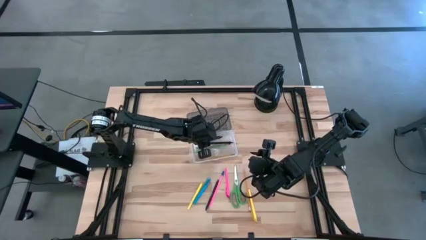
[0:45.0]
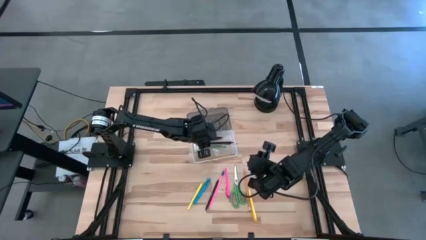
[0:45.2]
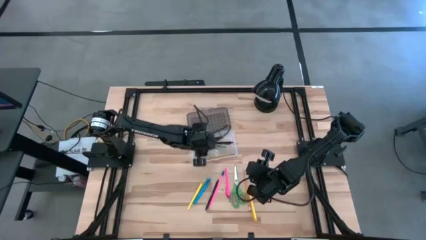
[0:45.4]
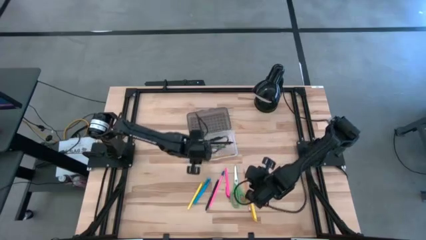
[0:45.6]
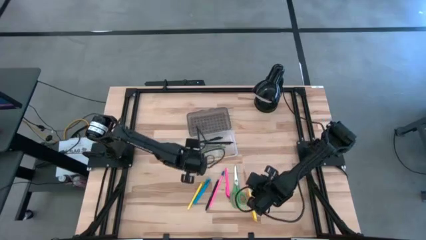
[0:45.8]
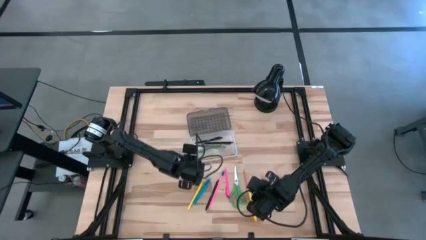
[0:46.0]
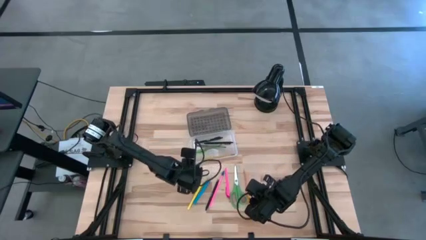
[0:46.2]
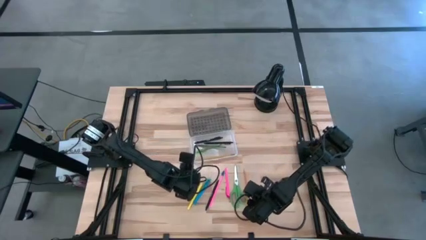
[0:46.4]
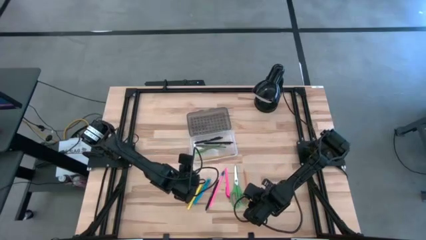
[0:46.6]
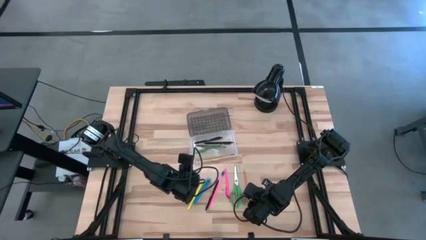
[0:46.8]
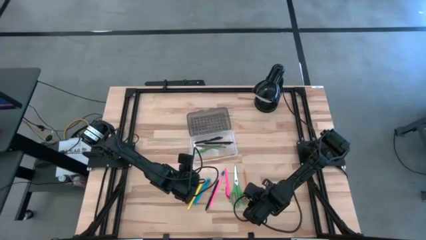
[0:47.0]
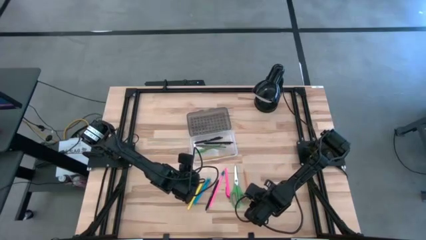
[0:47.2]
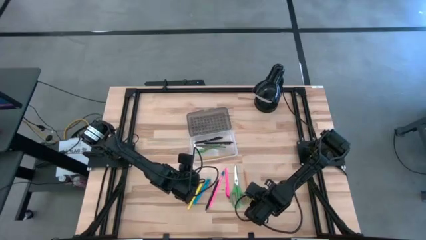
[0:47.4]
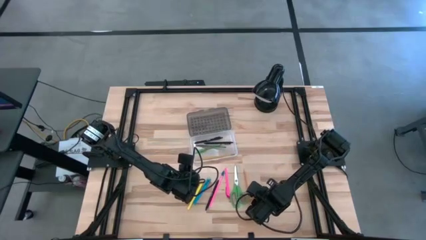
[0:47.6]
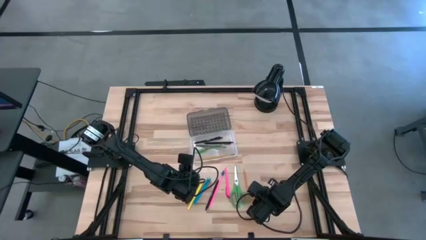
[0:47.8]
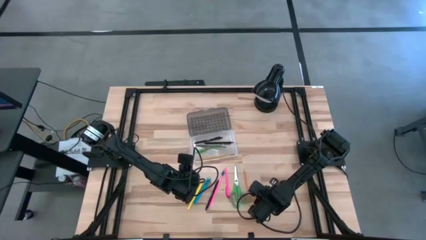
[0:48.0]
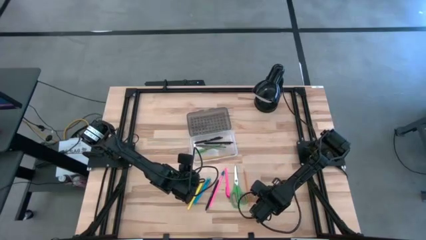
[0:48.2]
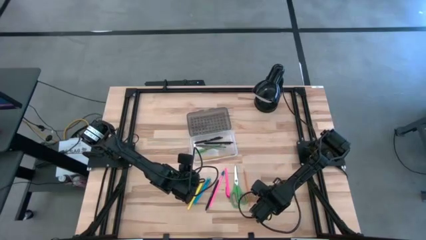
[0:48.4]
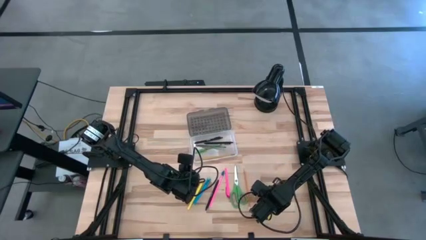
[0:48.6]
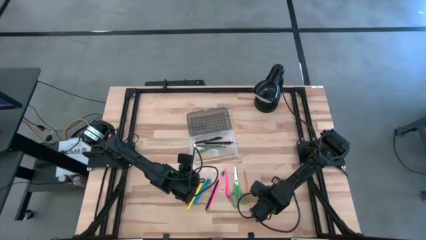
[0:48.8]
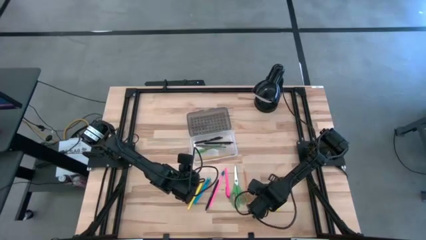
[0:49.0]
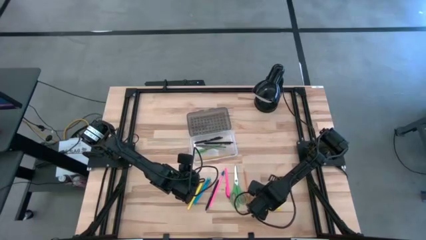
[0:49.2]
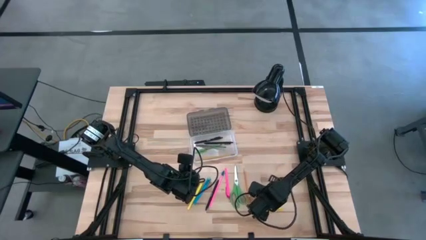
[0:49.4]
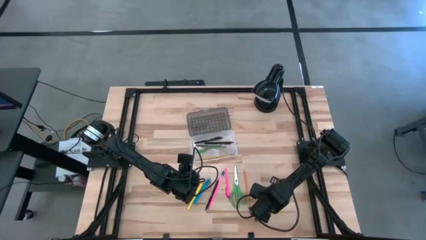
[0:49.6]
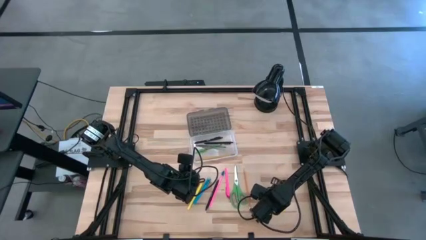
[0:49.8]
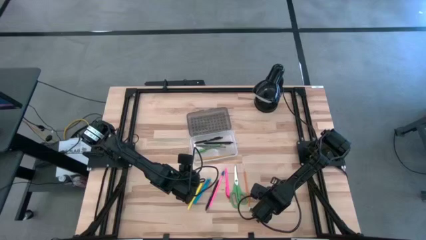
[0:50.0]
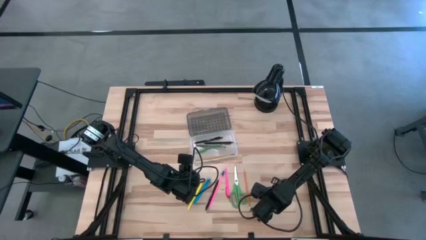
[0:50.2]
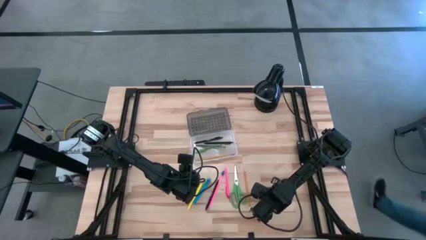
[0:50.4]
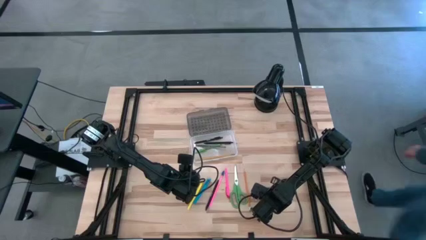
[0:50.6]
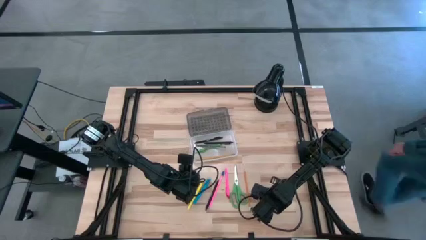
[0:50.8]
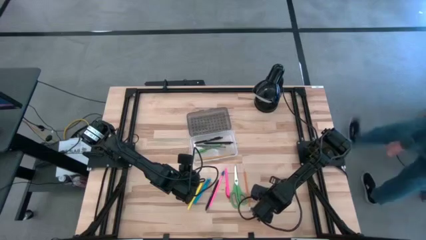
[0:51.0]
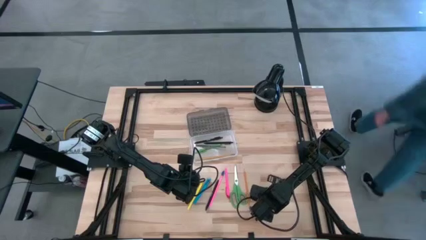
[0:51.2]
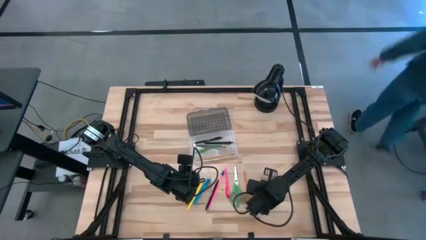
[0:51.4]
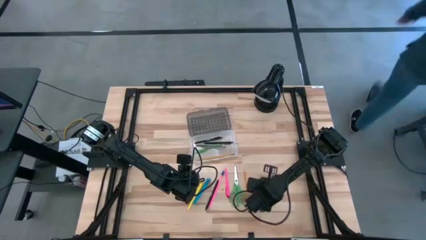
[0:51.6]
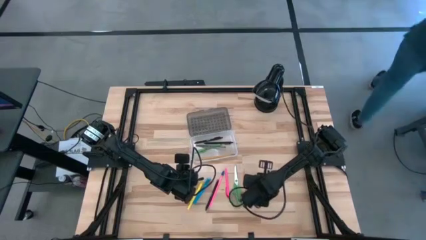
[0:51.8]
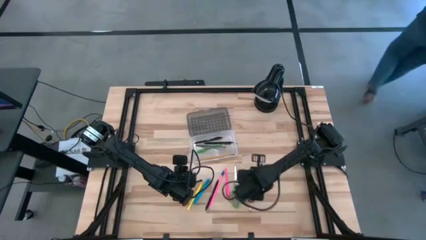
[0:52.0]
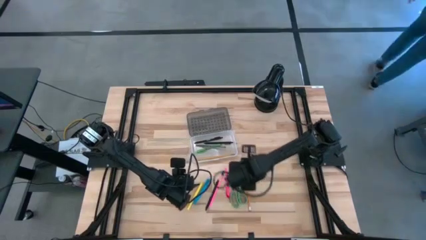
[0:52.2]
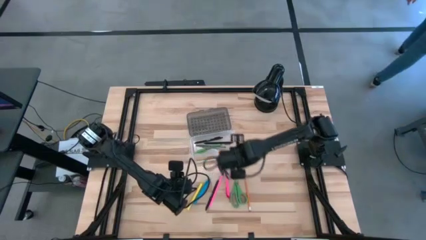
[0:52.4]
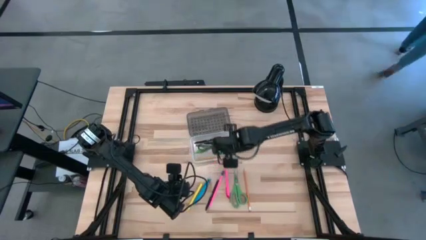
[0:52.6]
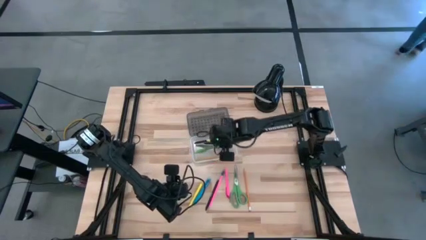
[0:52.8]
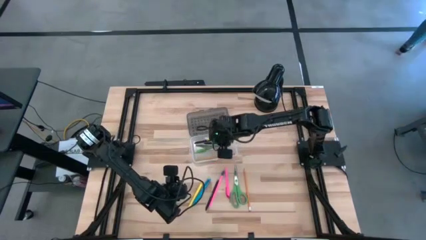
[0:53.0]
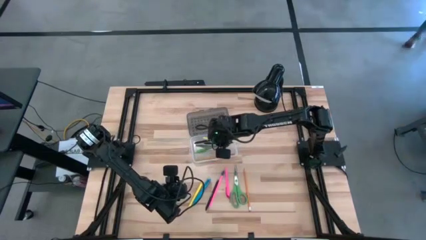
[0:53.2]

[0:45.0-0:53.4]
Task: Pick & place school supplies into a supply box
Put the right yellow pen into the transparent supply box

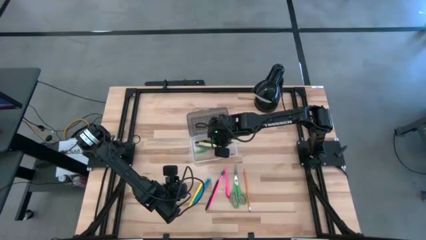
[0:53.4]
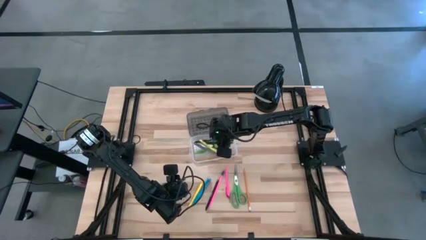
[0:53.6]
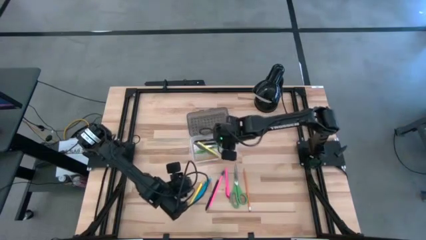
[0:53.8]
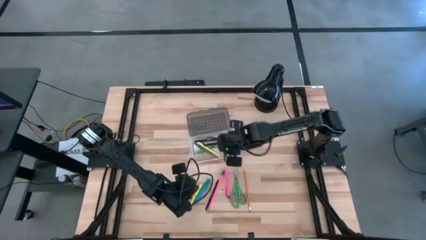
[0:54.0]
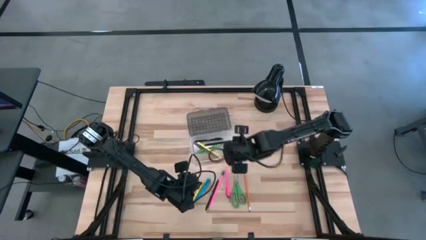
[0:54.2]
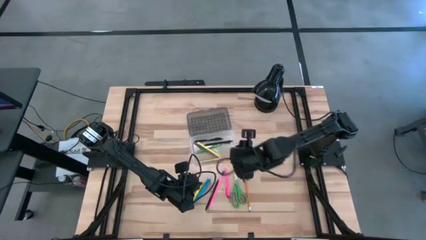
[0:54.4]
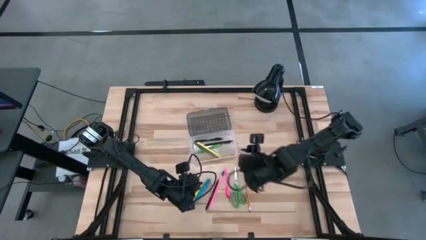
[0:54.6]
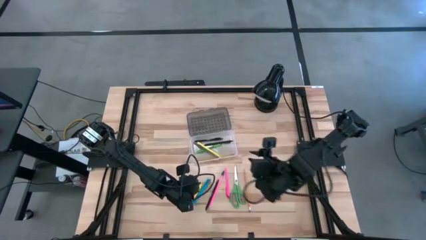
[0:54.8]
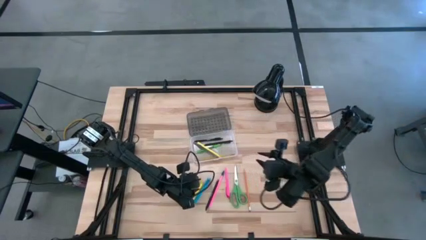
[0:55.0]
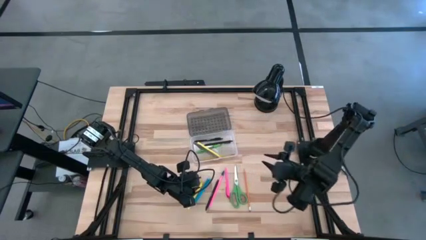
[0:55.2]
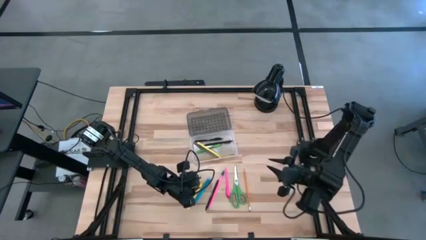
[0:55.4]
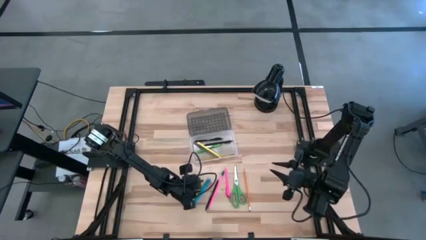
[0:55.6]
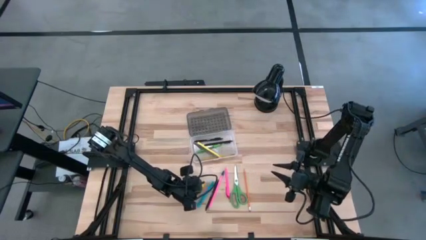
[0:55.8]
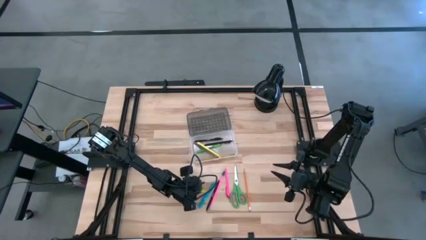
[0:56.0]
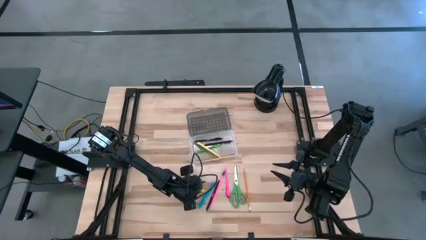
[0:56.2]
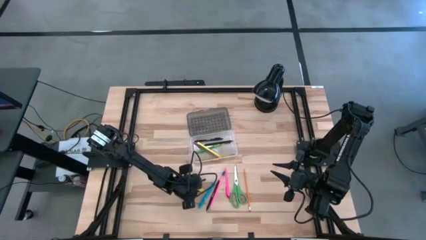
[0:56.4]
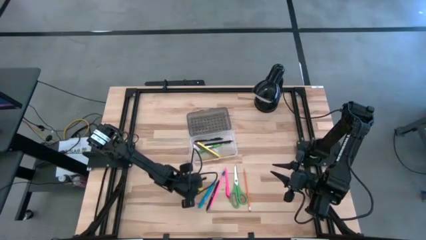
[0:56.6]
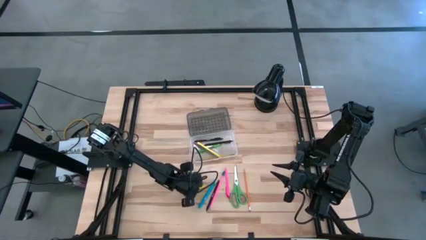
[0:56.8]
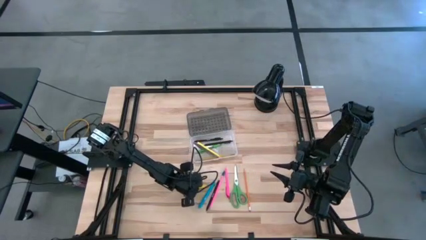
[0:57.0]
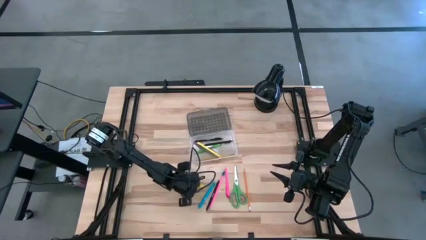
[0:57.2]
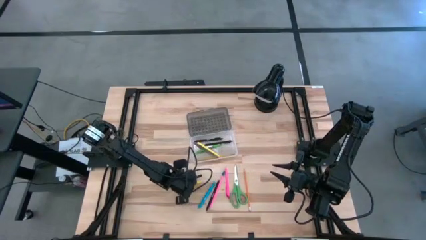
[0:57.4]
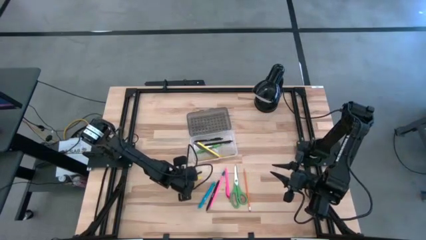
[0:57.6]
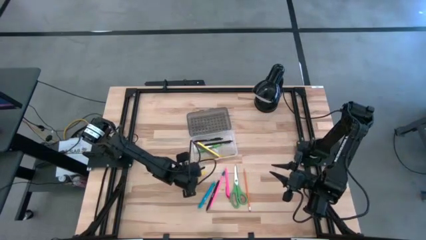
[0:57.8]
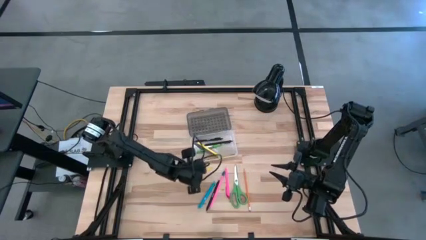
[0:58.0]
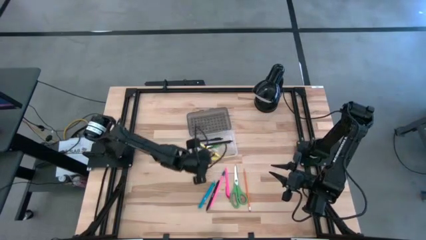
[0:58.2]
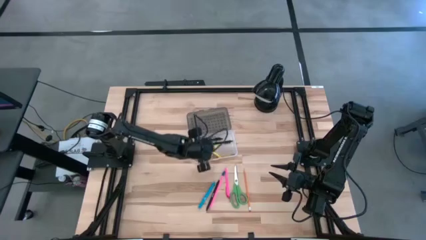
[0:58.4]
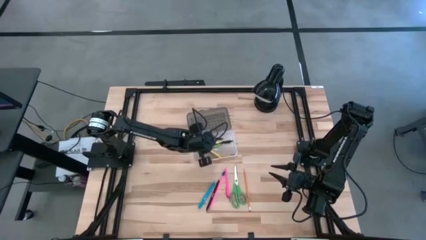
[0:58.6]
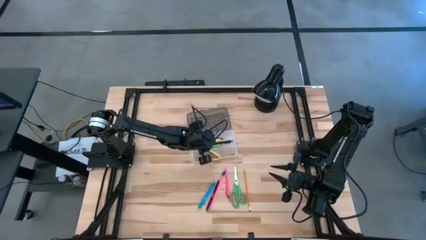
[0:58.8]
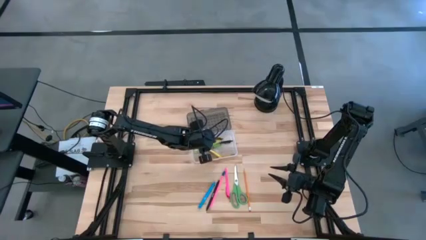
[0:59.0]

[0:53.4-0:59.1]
Put the yellow pen into the transparent supply box

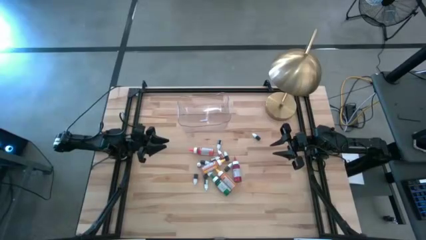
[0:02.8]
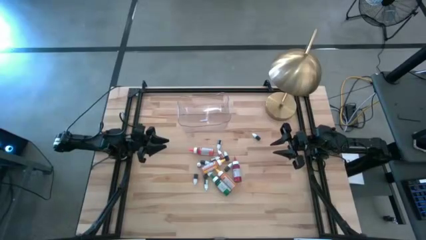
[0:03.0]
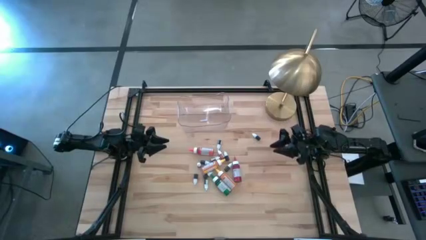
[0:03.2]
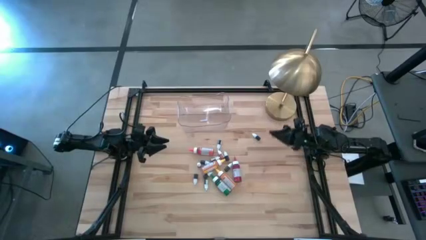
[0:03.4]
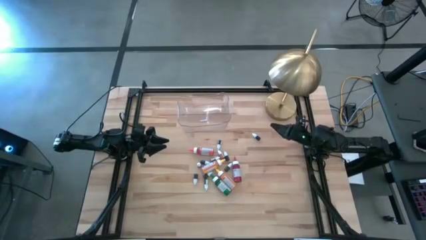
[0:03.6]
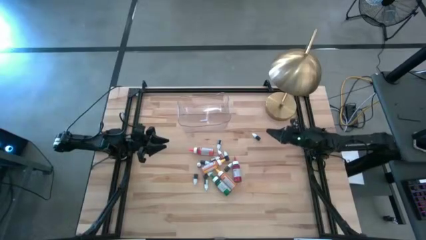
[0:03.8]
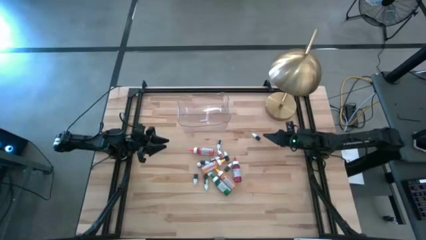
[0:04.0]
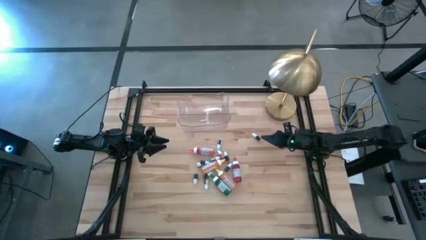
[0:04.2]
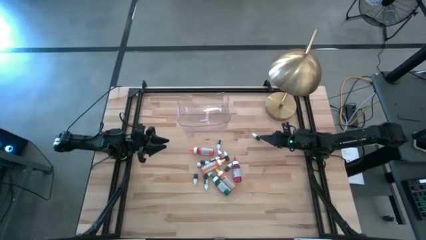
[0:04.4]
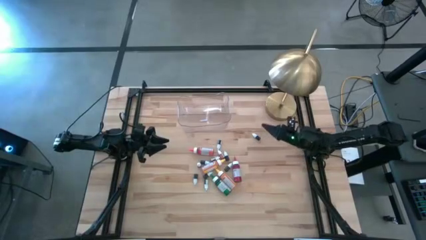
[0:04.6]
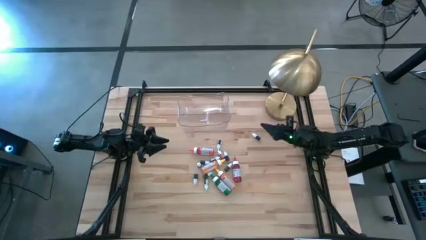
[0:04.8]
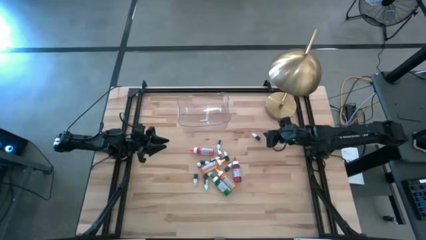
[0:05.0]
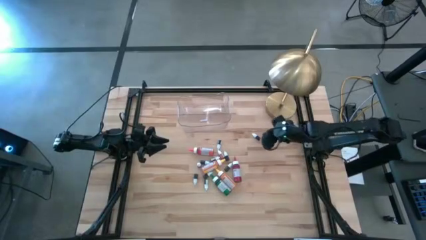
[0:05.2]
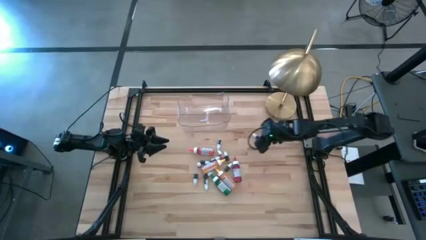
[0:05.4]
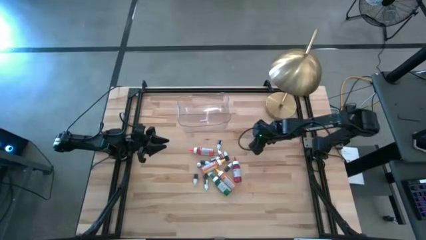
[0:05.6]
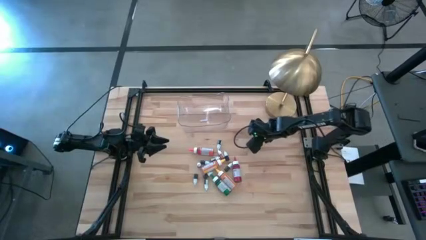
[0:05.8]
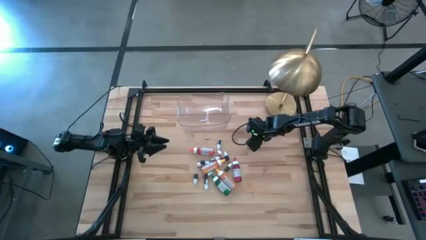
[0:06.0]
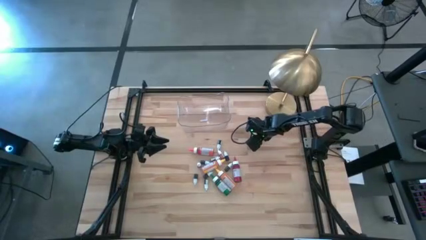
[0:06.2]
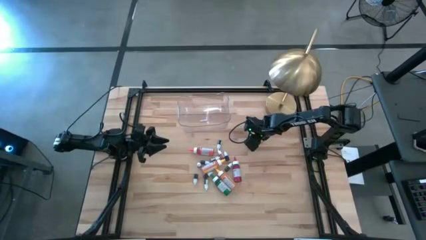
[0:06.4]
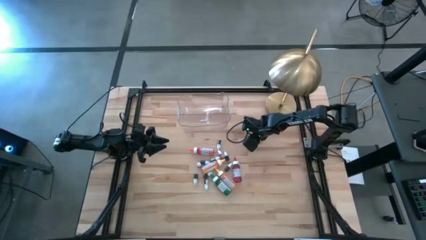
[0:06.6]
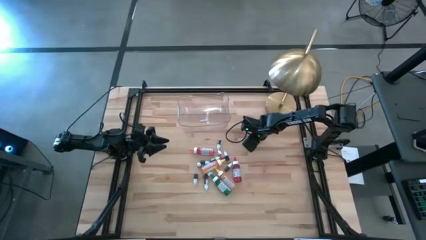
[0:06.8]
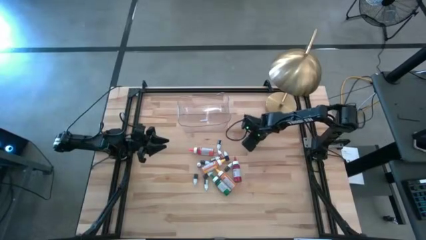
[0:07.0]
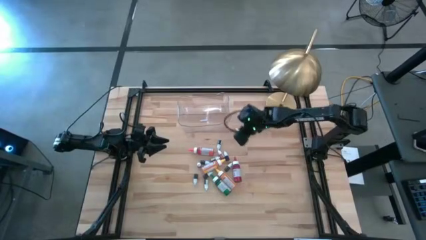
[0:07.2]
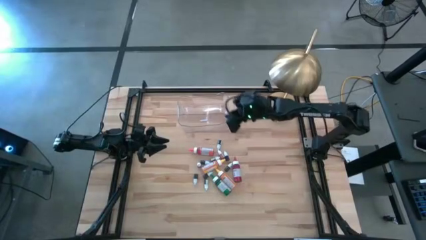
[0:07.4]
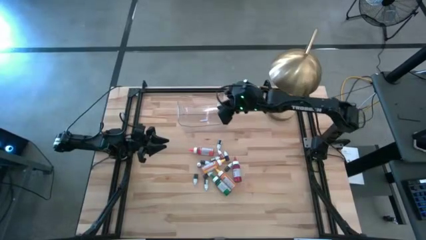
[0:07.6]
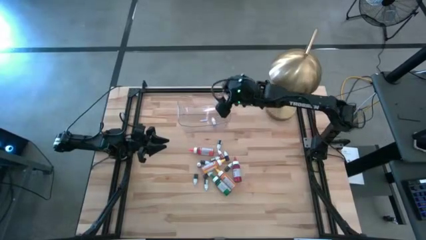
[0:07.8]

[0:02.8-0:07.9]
Task: Pick & Place food coloring
Put the small black food coloring bottle into the transparent bin
